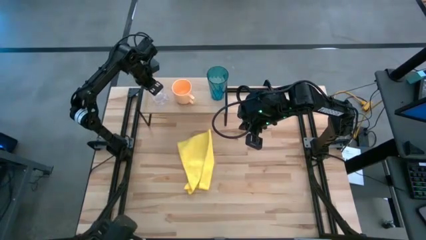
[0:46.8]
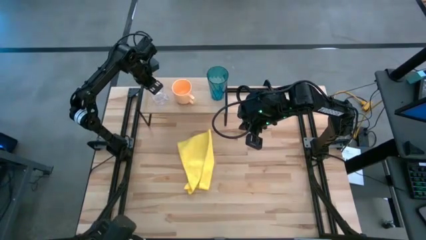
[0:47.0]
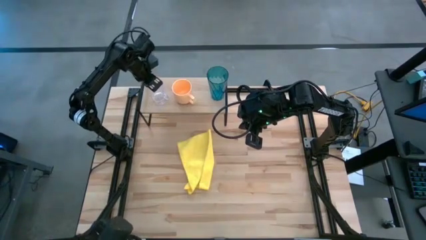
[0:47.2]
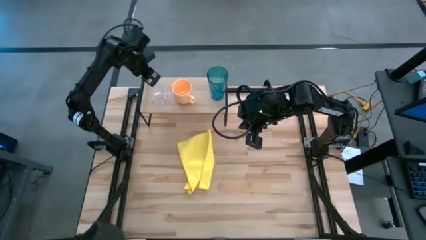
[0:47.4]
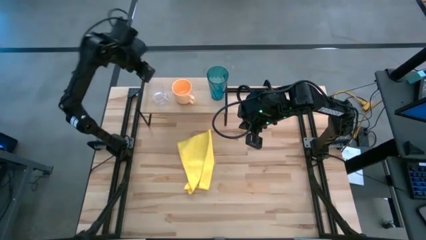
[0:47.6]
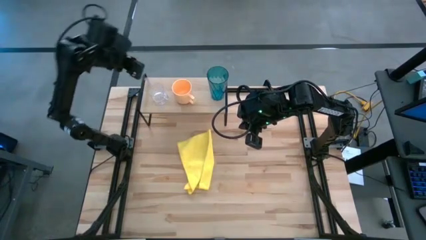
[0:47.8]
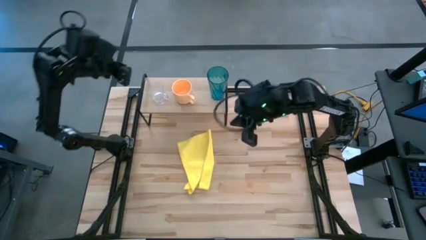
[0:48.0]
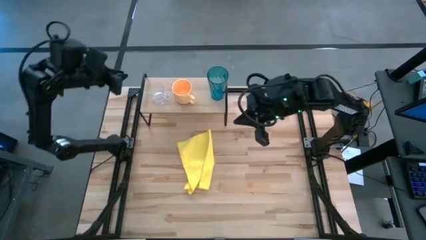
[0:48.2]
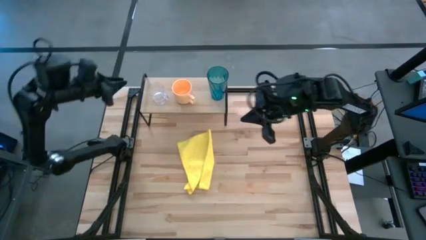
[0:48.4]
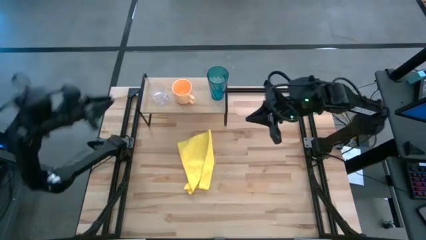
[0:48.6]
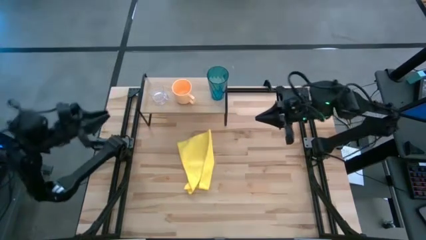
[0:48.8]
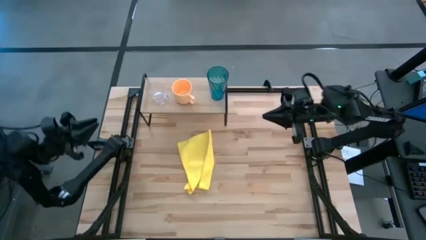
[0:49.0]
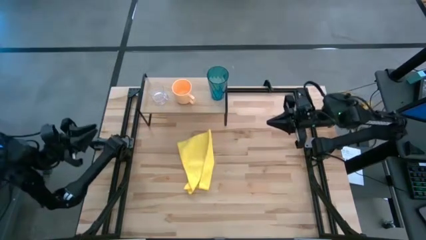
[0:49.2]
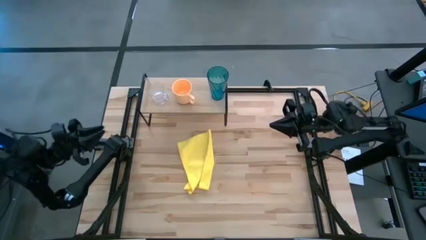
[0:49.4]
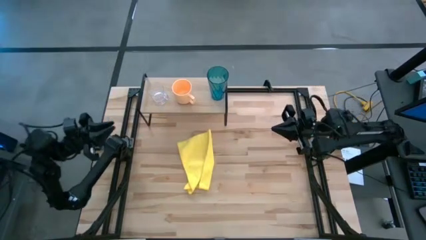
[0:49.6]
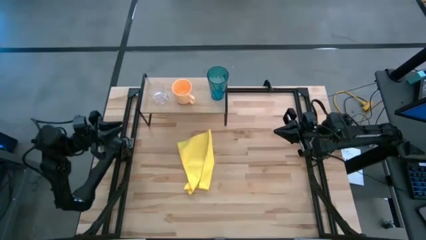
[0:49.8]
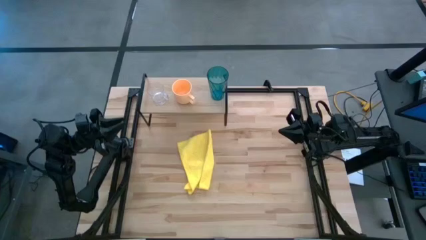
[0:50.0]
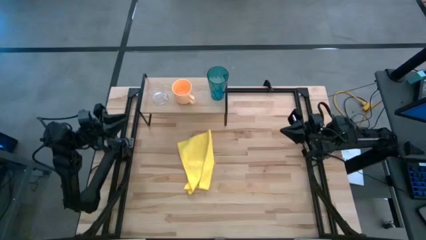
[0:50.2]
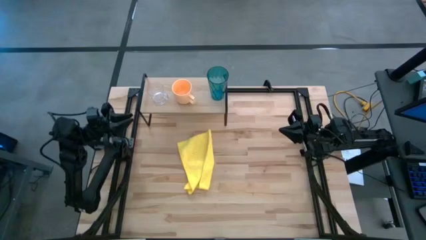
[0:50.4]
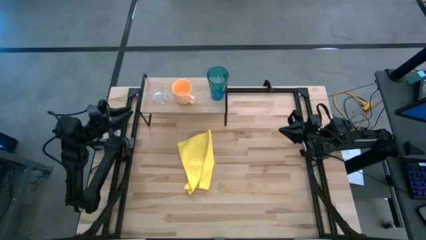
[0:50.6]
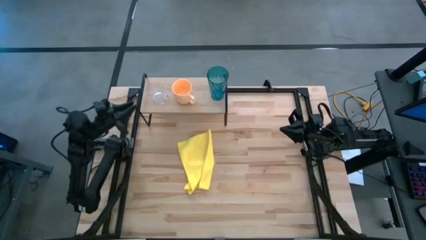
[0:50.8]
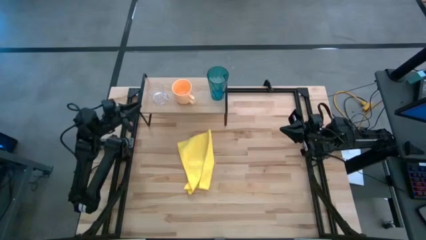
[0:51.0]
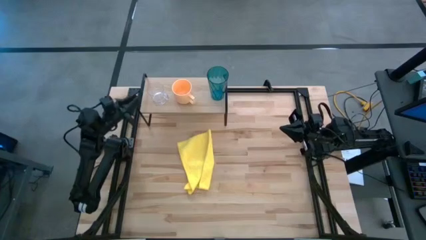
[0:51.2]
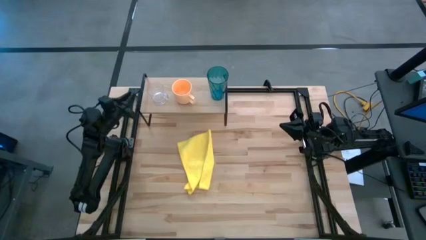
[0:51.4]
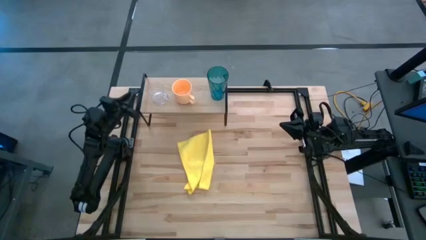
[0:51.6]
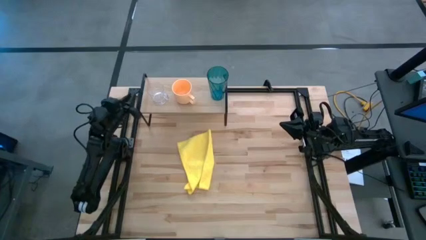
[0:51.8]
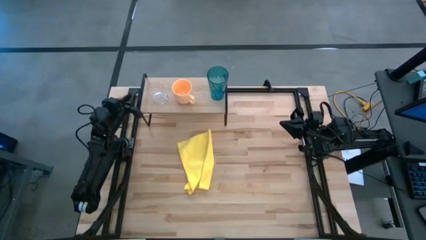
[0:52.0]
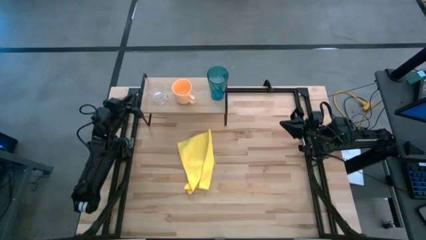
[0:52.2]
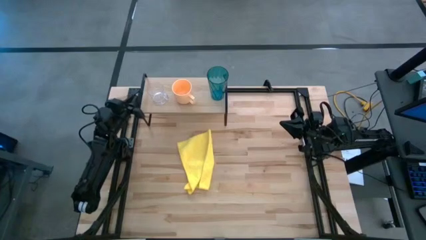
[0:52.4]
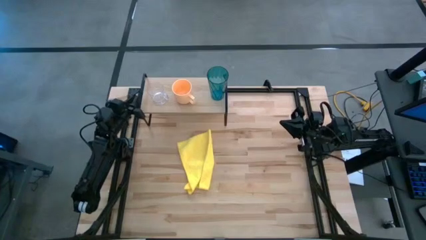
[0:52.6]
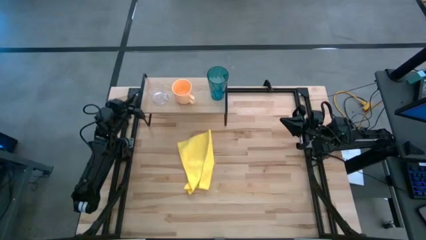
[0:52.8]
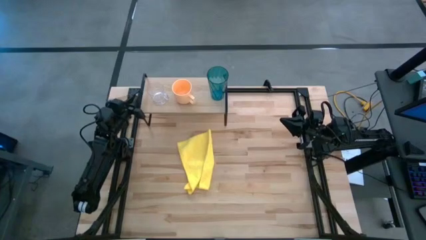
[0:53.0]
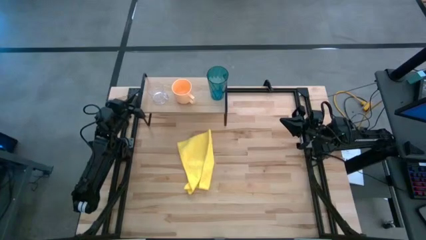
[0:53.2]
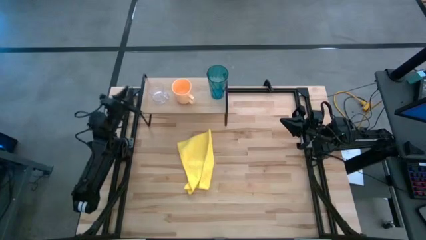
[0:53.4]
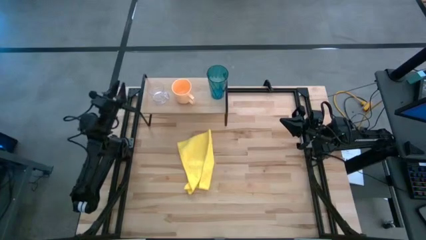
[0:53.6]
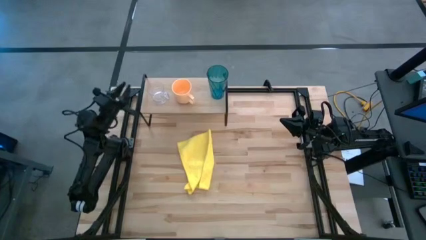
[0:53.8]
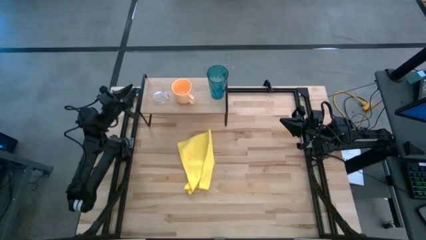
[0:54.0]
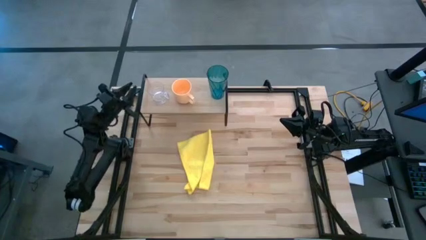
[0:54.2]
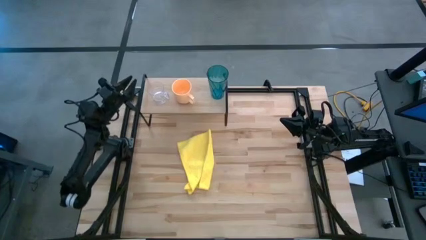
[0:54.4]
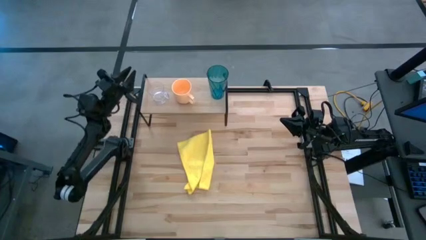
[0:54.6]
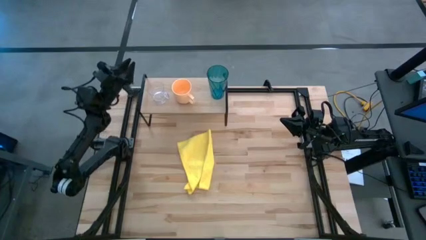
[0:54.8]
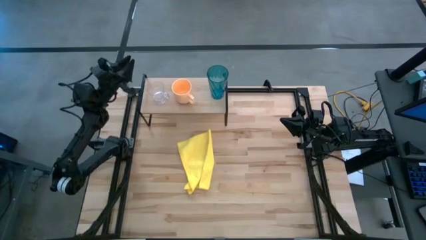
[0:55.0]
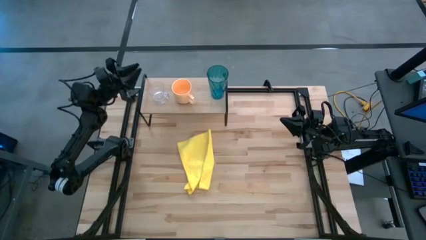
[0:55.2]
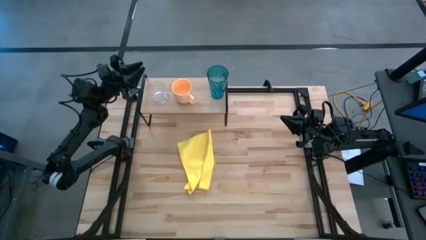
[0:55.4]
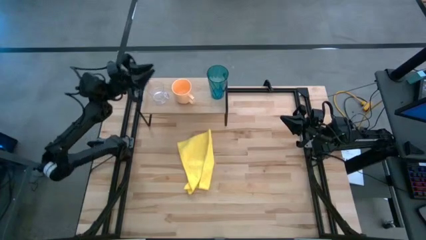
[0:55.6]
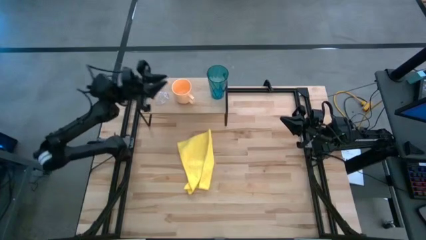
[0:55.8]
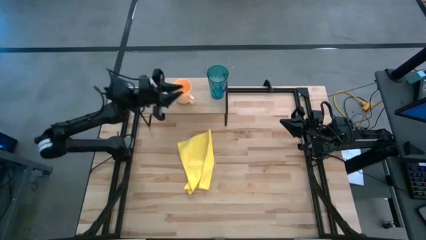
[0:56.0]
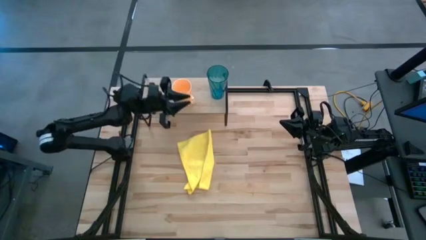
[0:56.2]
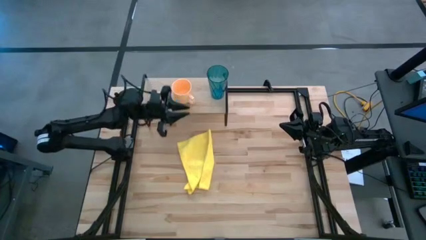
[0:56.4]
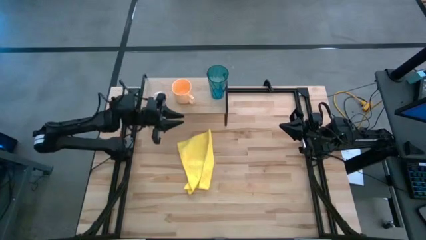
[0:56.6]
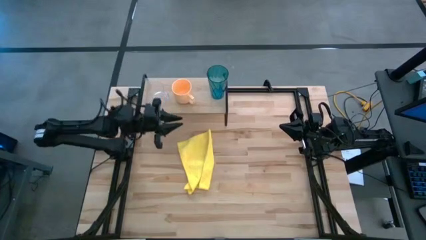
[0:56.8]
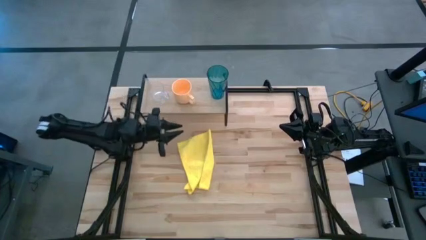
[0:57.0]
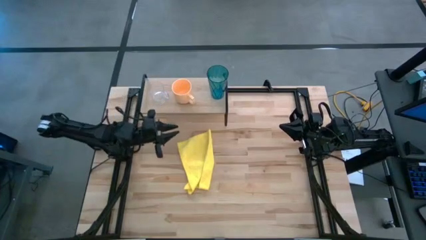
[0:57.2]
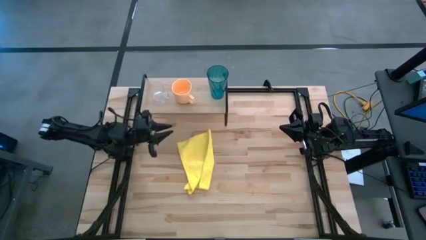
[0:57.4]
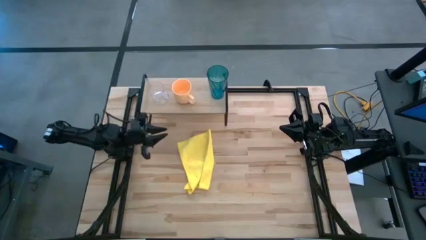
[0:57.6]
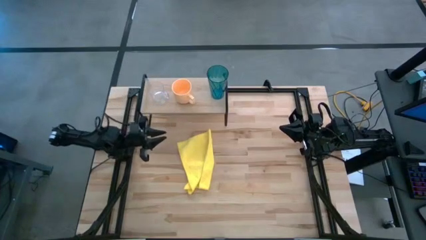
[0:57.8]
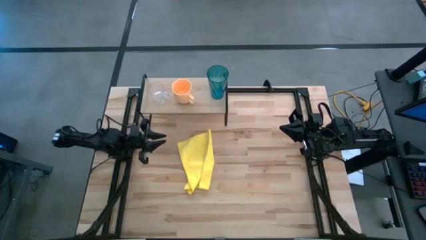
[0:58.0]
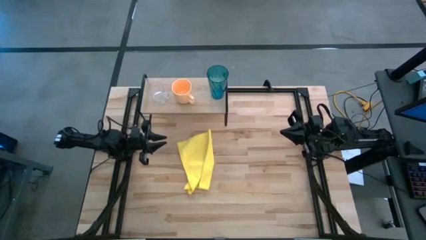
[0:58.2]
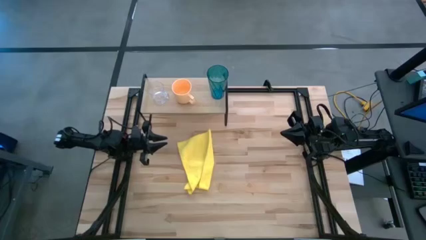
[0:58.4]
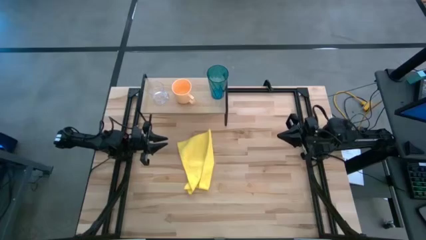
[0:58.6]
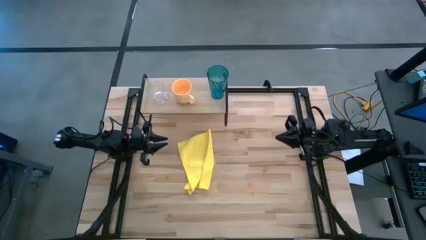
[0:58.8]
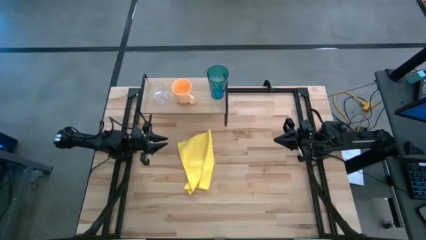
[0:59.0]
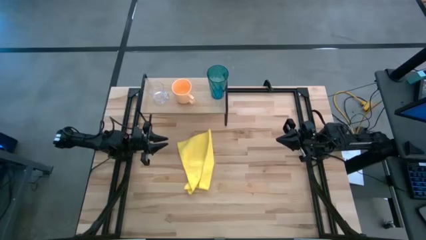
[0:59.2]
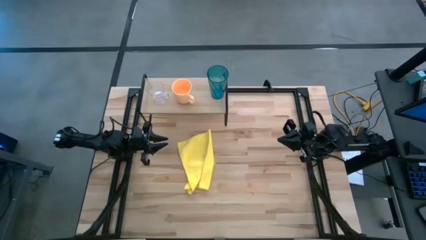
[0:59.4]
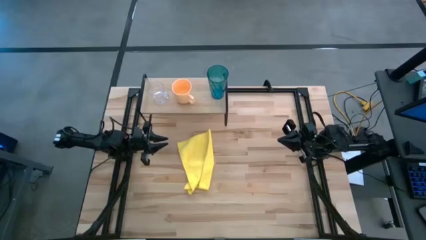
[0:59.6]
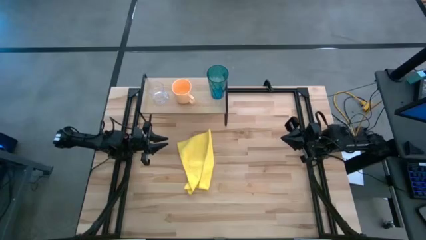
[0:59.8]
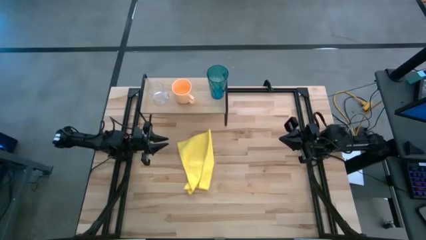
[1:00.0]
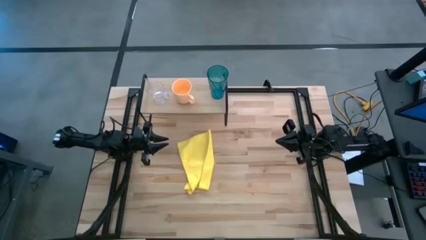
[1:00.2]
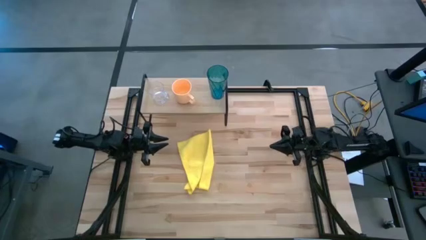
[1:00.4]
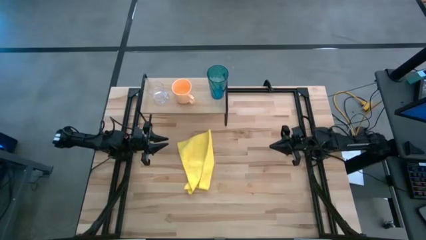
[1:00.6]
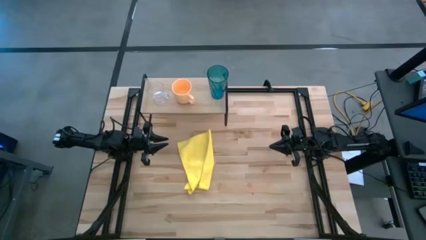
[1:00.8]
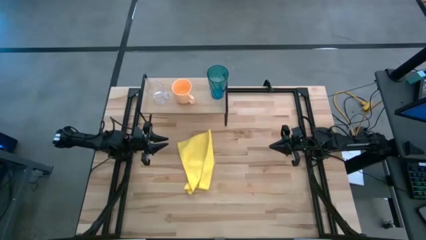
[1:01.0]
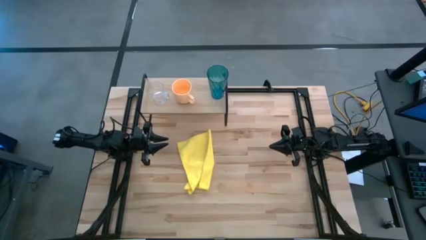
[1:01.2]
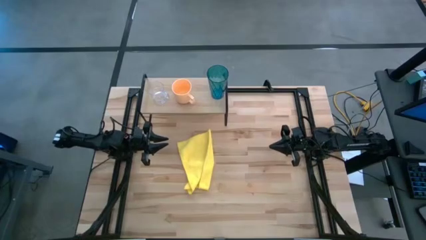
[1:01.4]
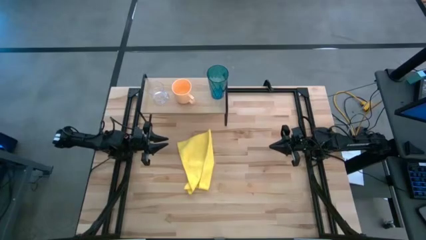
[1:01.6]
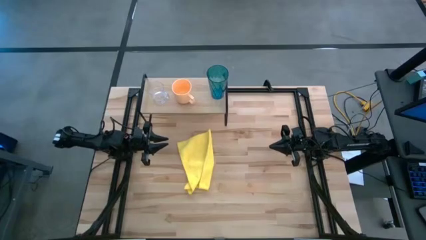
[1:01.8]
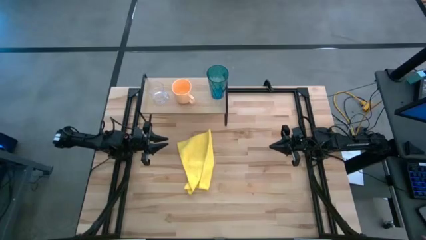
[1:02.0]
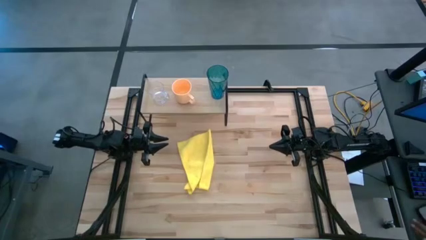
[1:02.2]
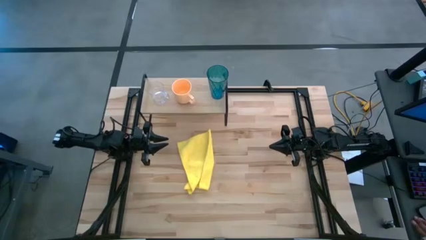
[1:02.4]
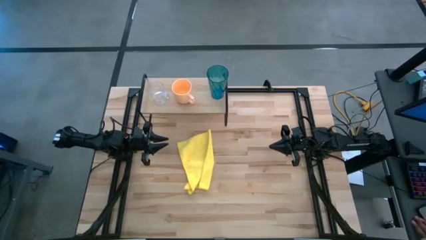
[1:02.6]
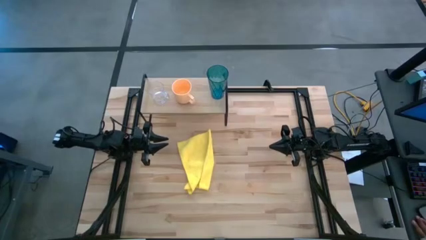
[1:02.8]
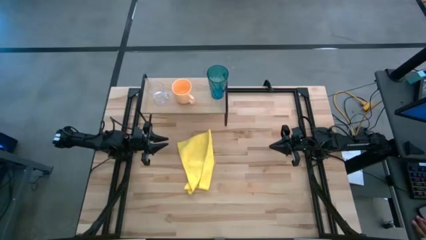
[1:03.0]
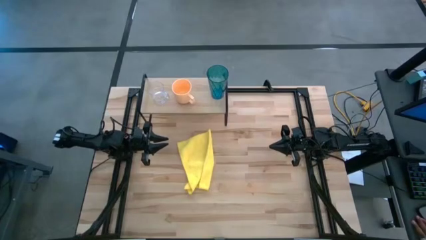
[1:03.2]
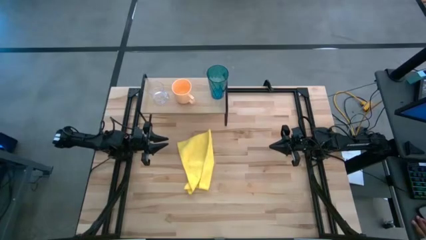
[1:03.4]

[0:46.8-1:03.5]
Task: Stack small to large cups/mugs on shelf
Return to Home Position
